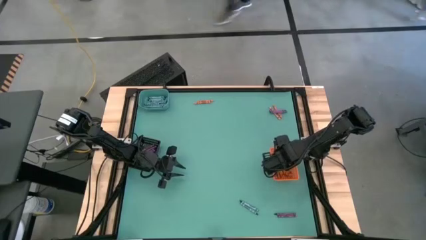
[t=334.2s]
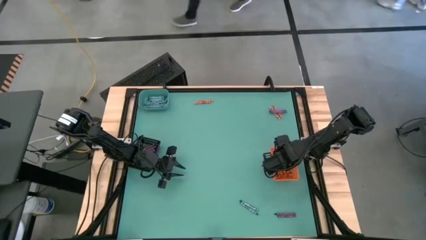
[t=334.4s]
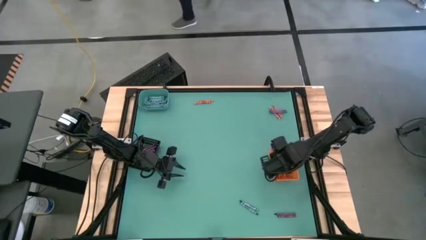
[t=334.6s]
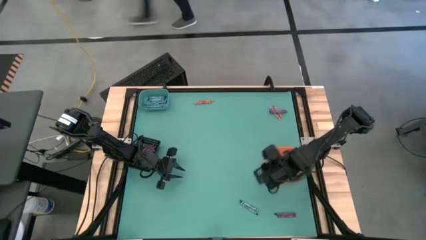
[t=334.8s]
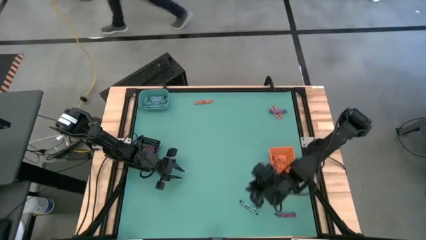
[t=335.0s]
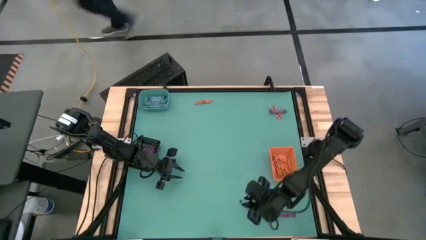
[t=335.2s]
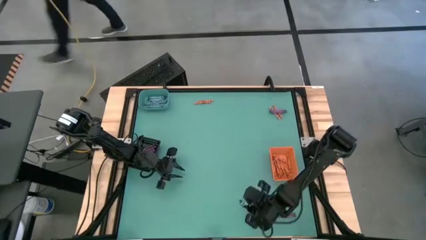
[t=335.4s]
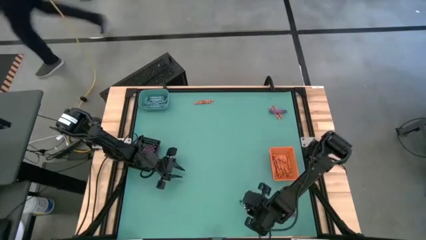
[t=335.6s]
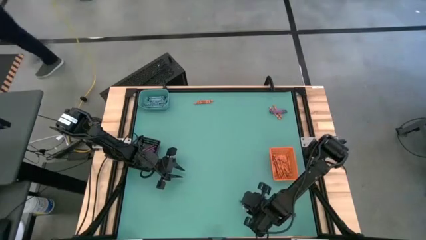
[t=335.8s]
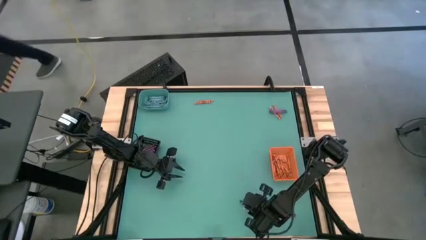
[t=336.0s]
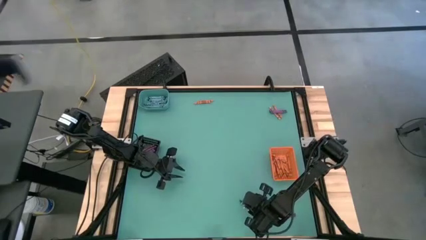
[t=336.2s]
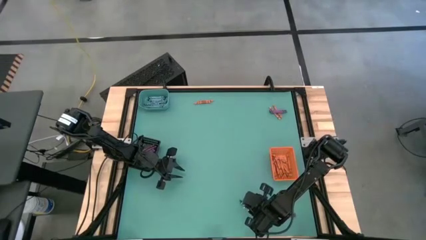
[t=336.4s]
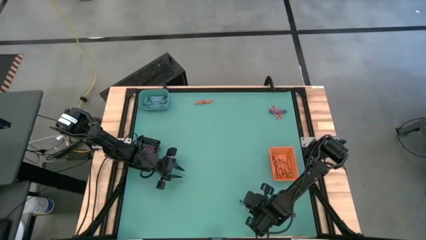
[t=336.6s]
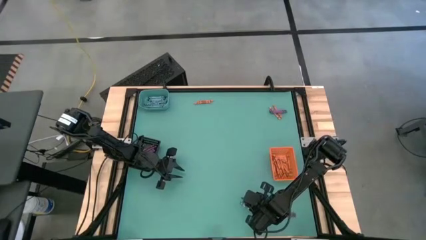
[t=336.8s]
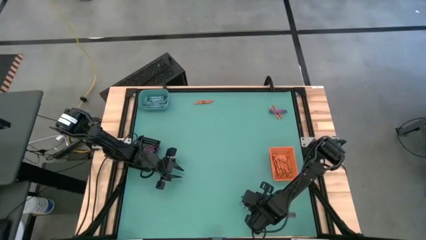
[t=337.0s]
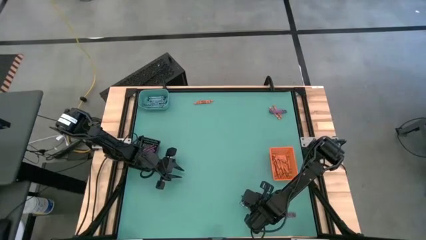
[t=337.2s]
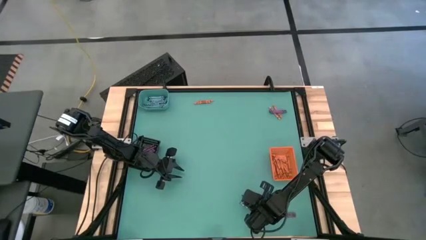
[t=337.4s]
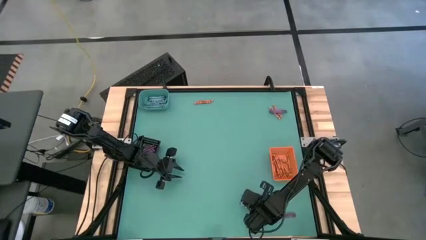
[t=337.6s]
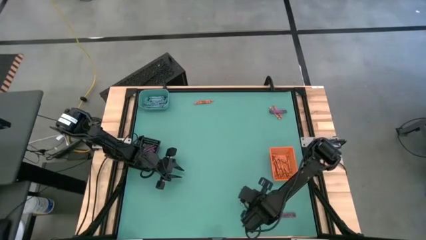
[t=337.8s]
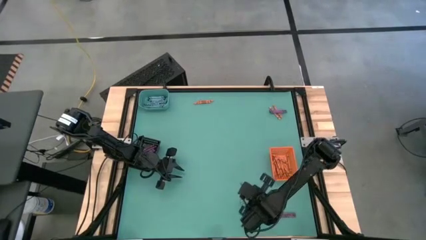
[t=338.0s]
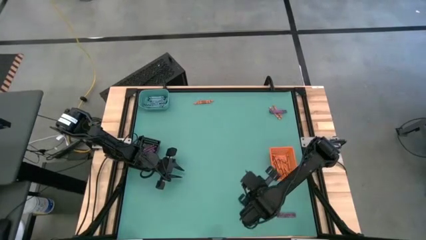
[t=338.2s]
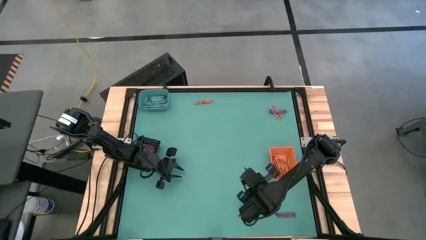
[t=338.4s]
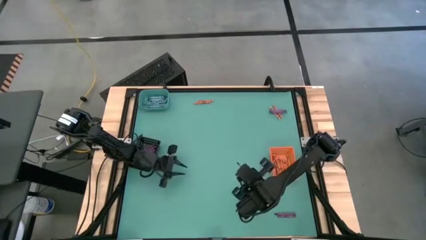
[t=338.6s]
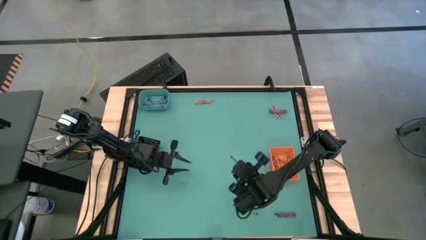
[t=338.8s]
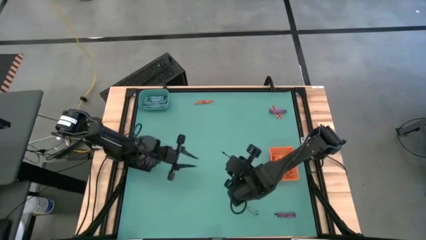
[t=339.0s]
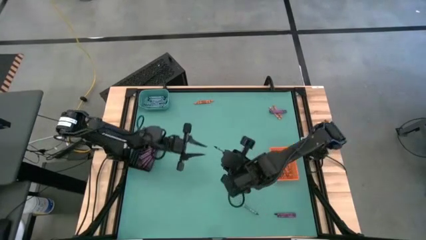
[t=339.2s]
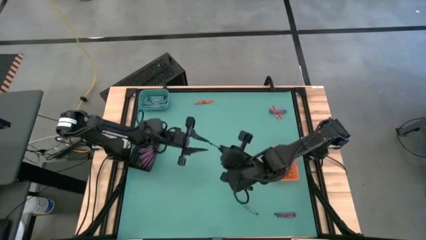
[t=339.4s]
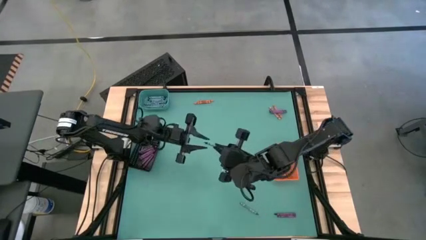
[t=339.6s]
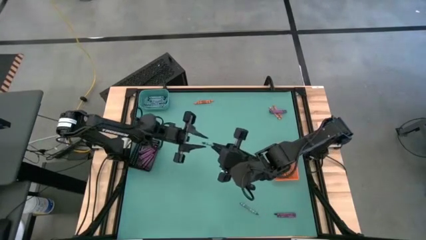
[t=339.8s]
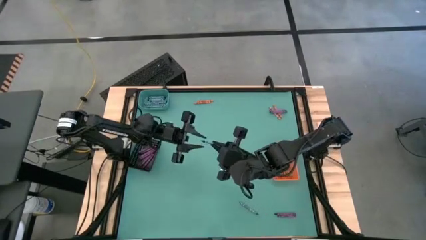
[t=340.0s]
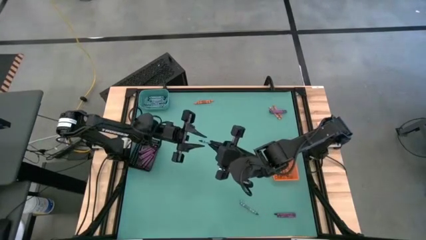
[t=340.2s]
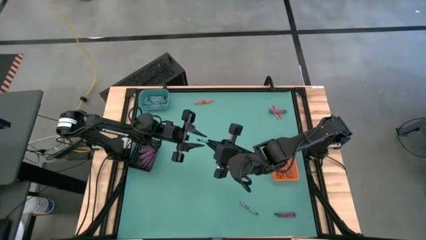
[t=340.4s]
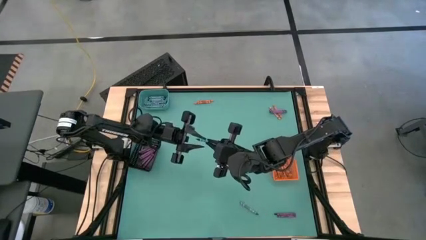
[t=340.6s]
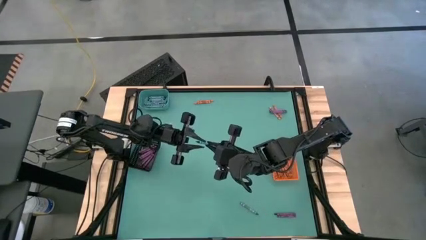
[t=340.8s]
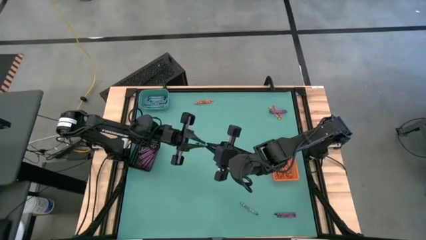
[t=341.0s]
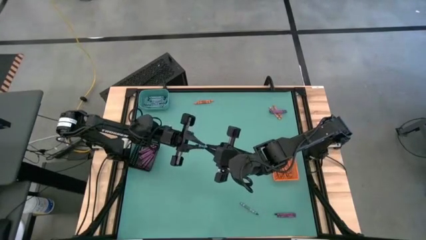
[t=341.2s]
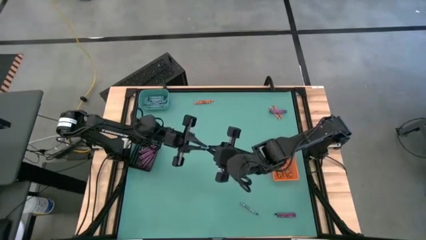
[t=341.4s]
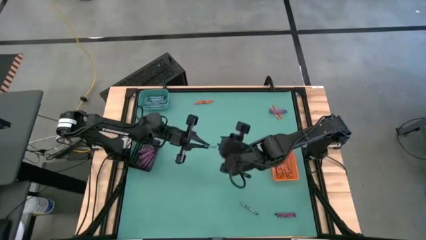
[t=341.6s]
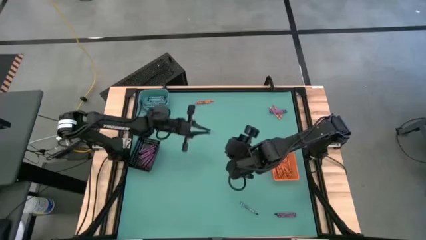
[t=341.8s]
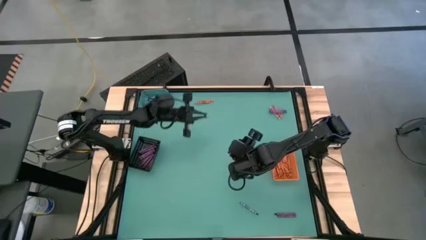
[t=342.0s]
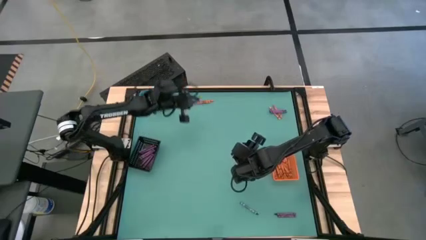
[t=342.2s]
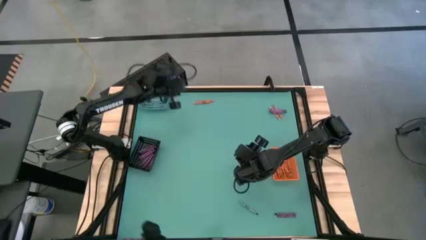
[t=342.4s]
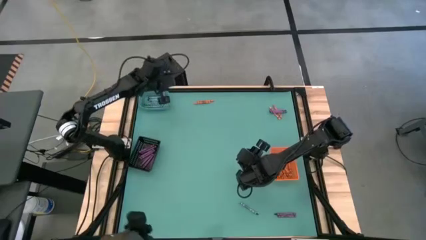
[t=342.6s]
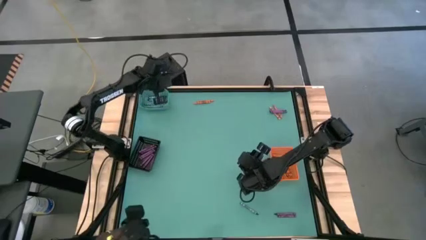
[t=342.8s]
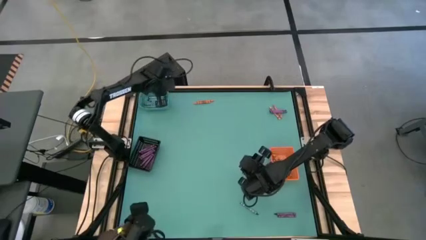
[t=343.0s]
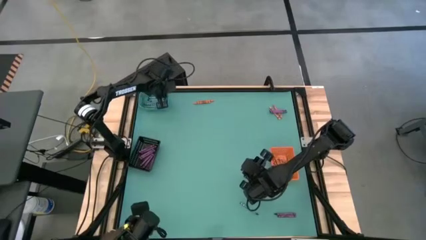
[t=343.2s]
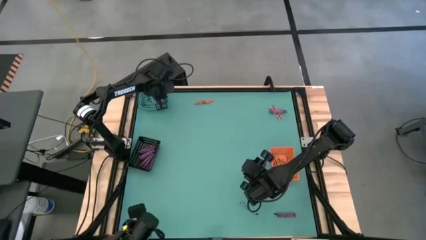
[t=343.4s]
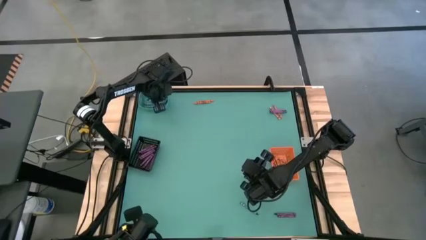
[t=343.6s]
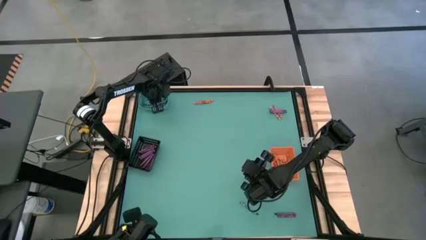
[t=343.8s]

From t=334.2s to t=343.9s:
Task: Sort crayons
Put the blue crayon into the green bin

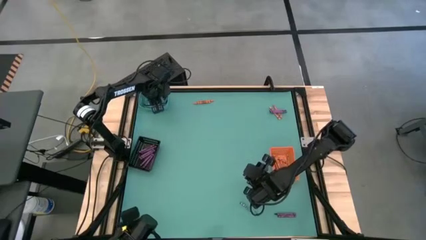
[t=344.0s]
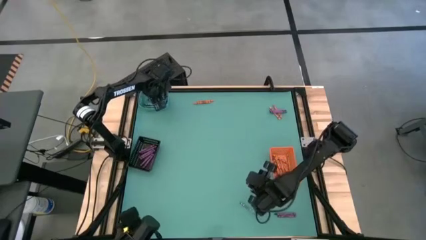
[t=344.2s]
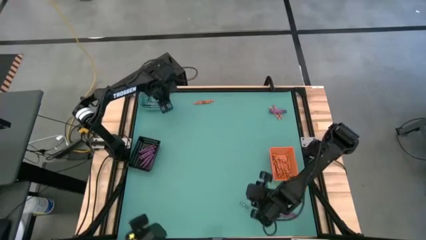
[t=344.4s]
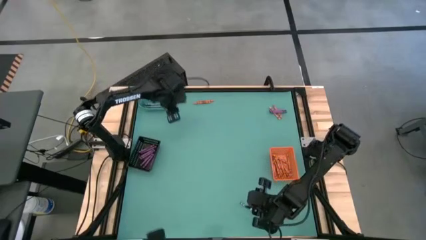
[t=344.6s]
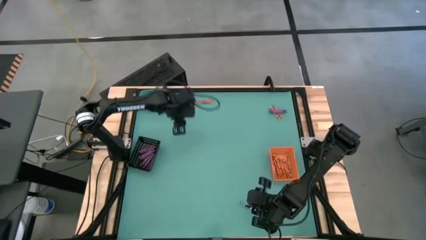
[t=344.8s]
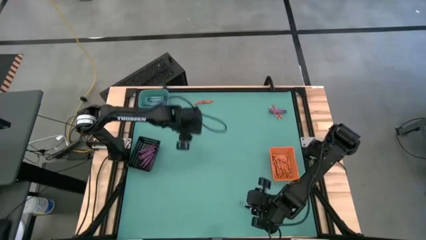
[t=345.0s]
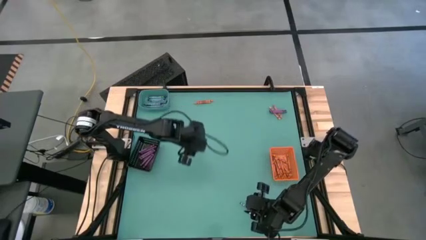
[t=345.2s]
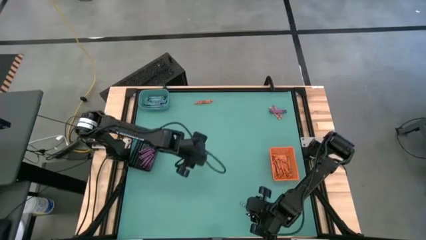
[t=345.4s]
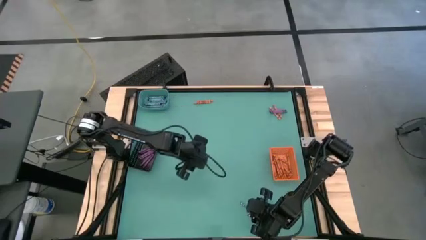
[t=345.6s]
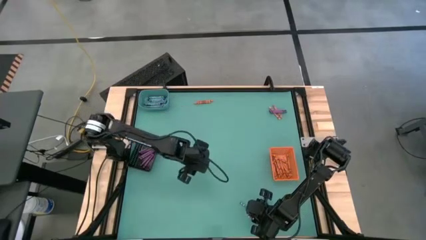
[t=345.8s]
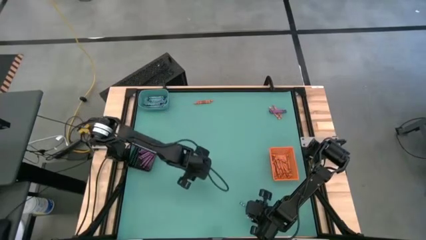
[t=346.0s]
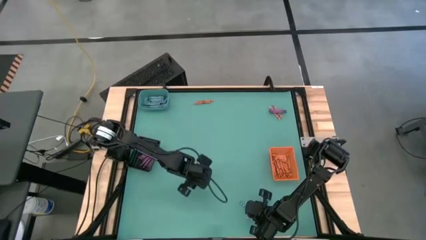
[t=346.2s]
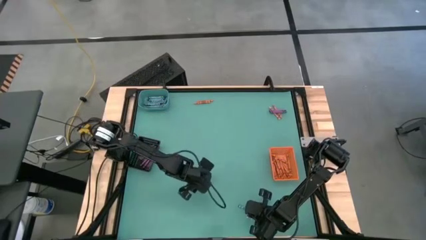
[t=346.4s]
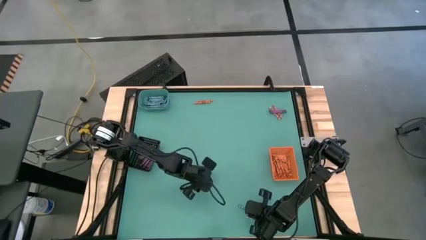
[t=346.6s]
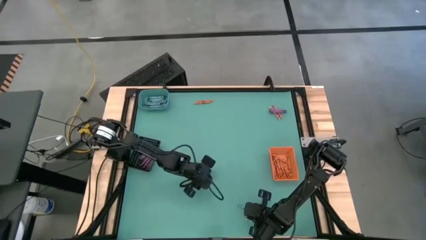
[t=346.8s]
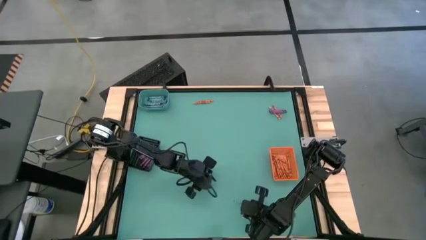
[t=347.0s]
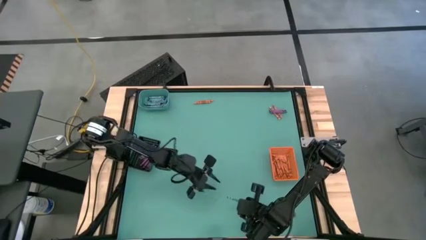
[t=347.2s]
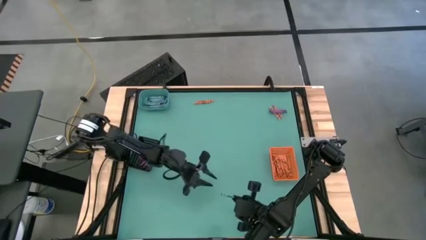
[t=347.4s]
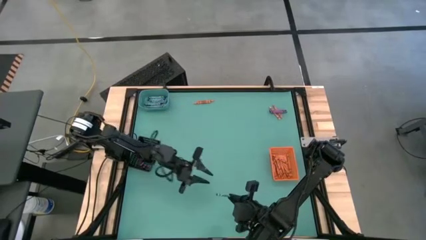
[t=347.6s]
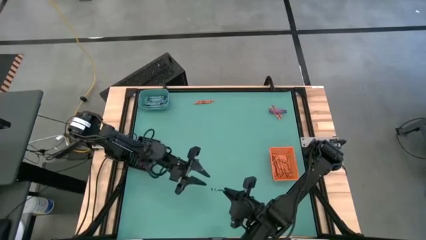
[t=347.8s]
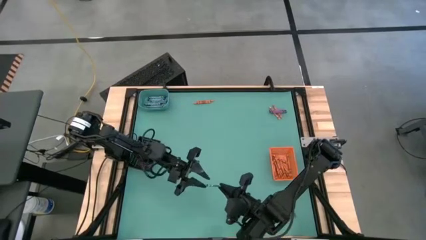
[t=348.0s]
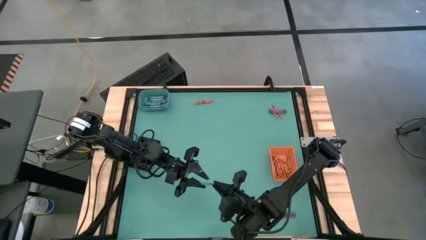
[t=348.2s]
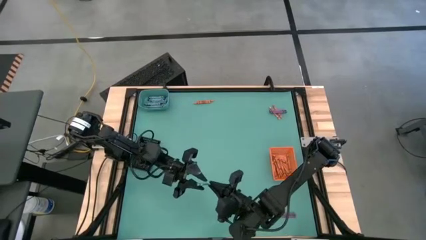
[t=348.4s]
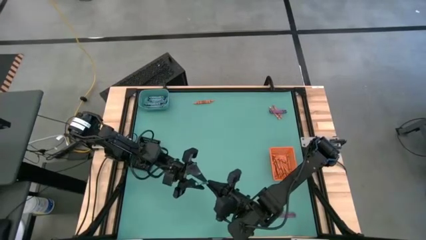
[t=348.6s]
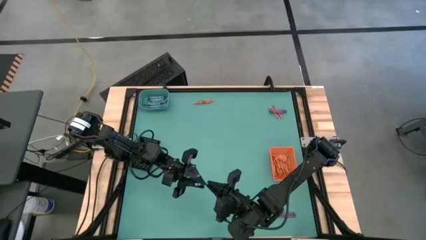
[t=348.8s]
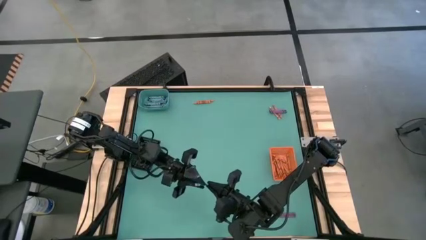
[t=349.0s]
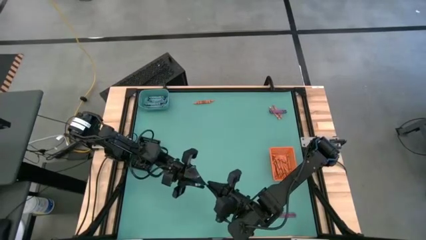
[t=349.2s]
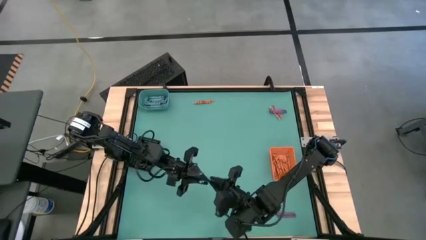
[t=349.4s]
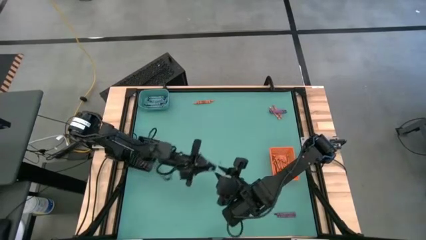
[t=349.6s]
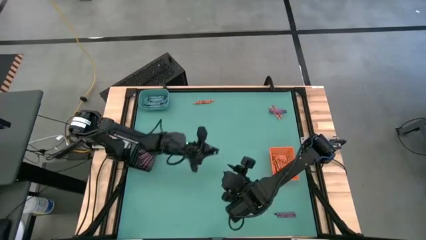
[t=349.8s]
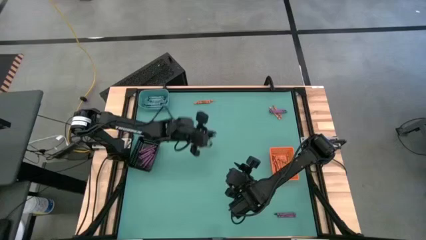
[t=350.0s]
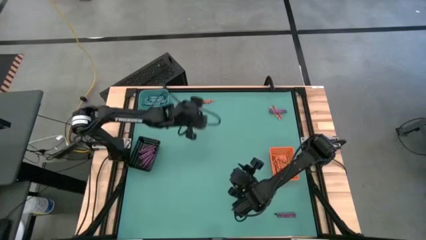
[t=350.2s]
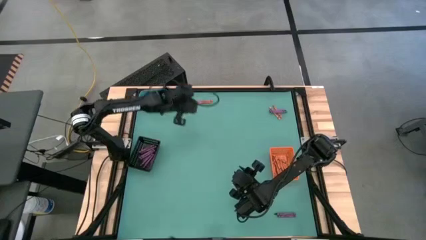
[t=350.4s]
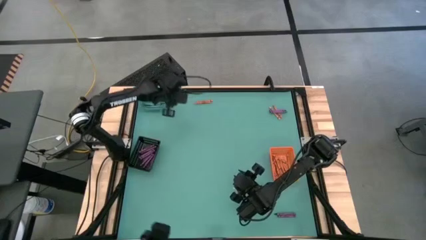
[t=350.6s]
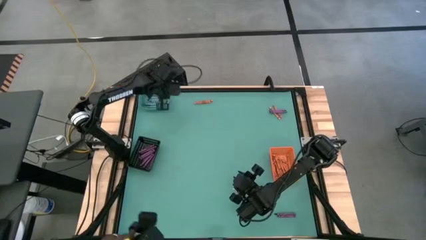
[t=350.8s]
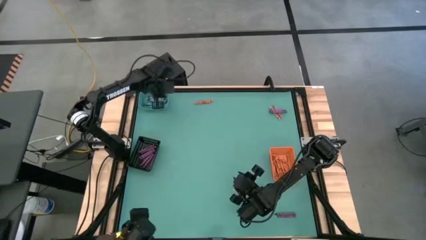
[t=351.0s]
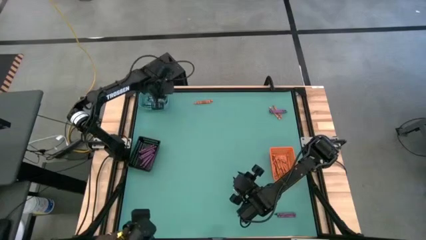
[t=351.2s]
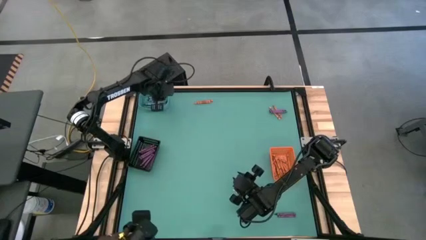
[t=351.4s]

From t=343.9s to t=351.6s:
Put the blue crayon into the green bin
